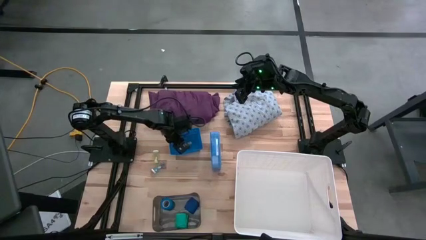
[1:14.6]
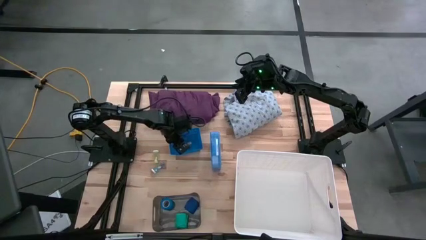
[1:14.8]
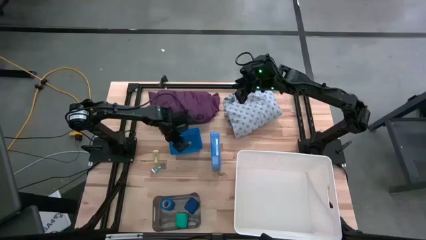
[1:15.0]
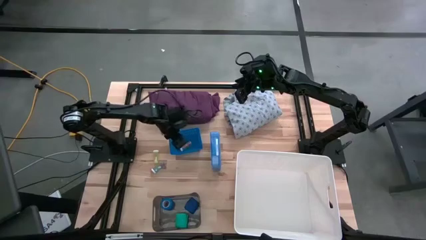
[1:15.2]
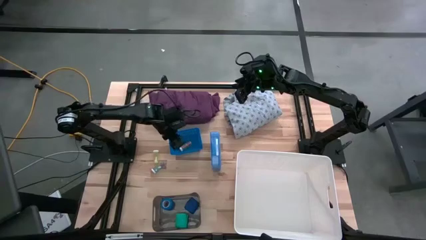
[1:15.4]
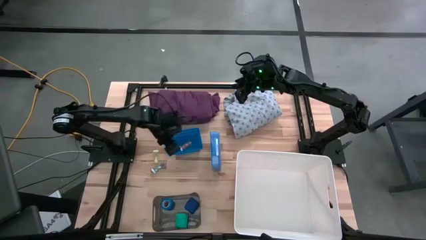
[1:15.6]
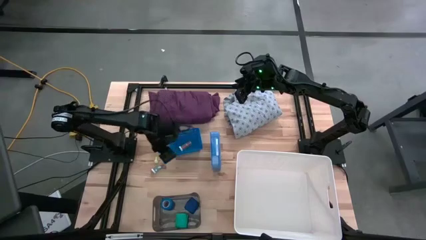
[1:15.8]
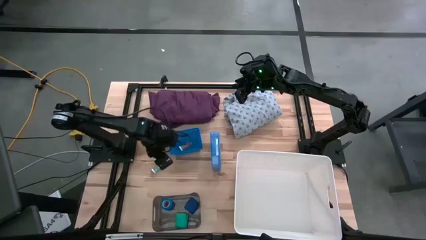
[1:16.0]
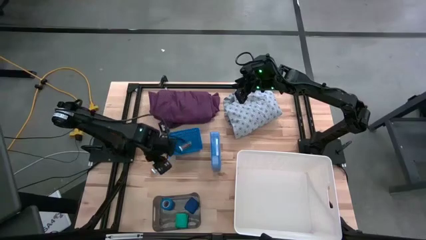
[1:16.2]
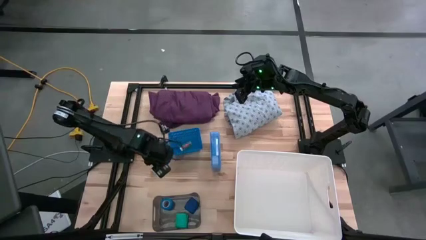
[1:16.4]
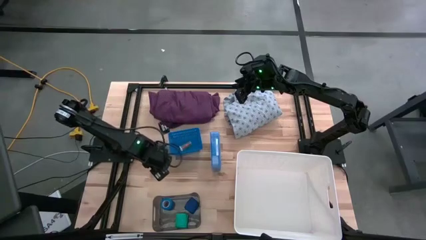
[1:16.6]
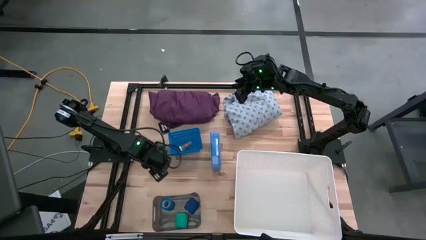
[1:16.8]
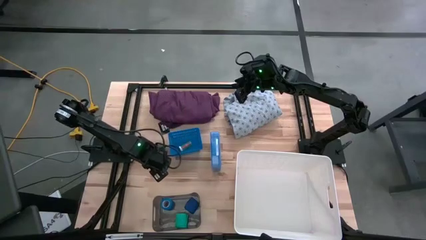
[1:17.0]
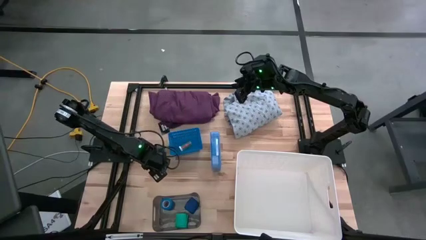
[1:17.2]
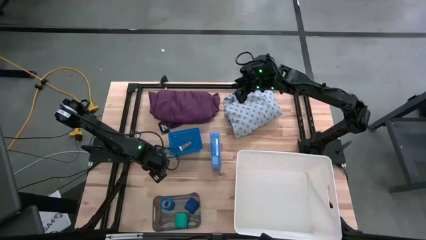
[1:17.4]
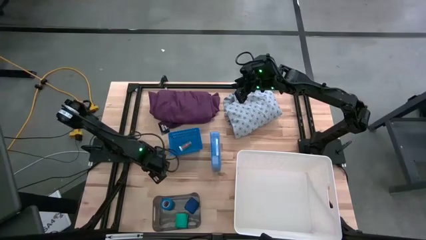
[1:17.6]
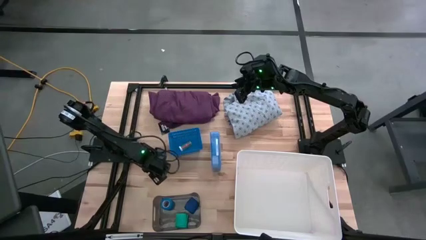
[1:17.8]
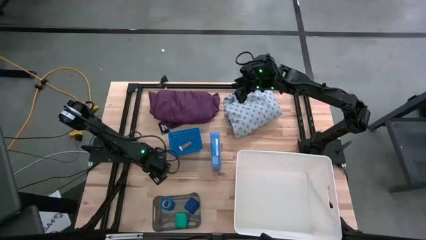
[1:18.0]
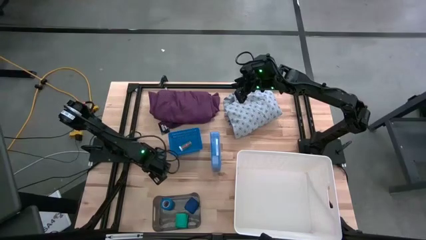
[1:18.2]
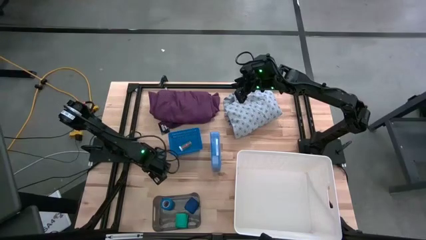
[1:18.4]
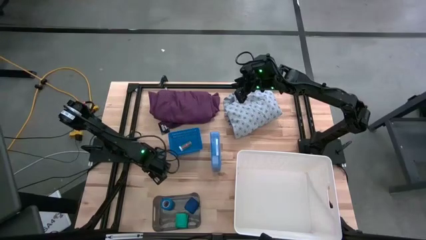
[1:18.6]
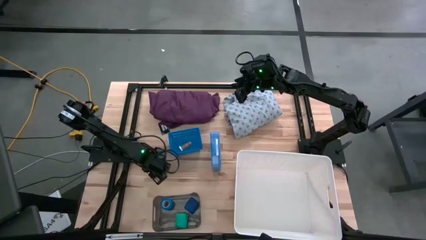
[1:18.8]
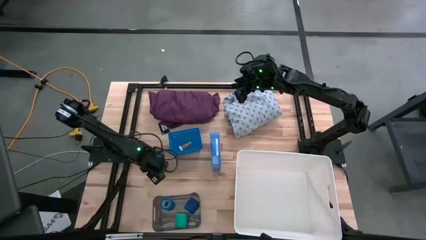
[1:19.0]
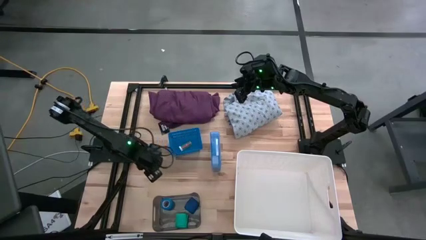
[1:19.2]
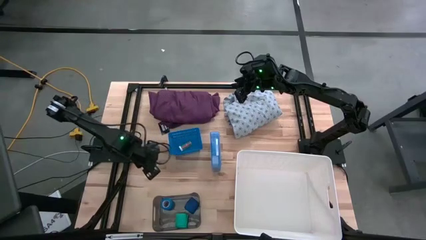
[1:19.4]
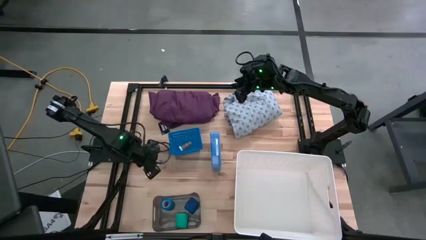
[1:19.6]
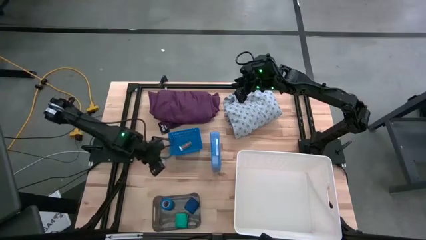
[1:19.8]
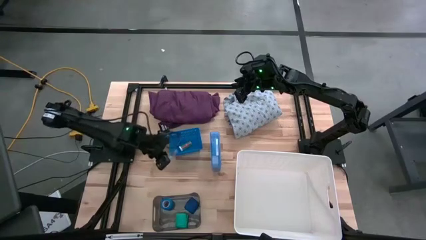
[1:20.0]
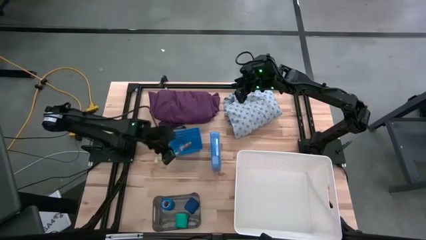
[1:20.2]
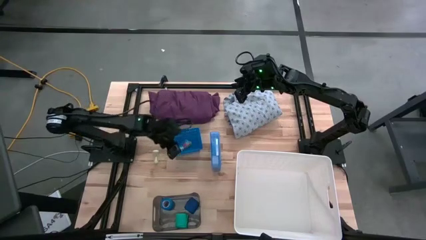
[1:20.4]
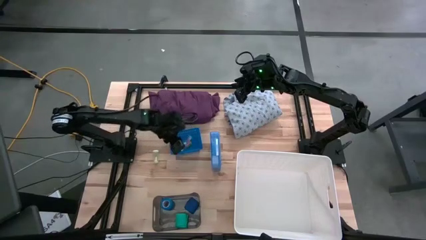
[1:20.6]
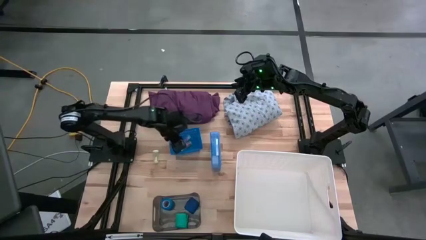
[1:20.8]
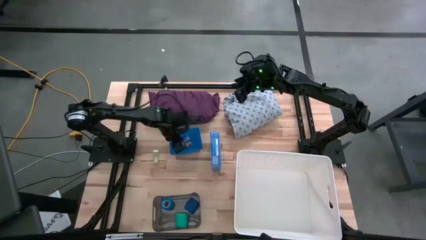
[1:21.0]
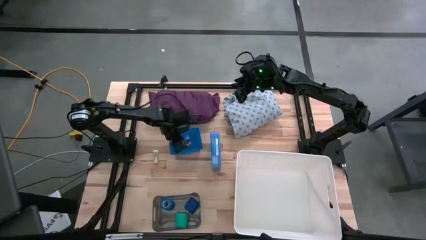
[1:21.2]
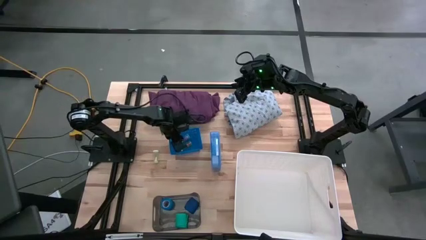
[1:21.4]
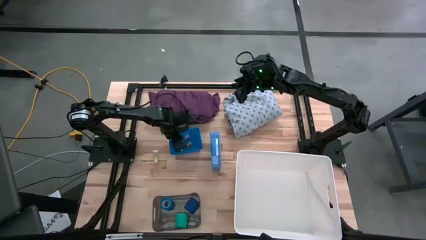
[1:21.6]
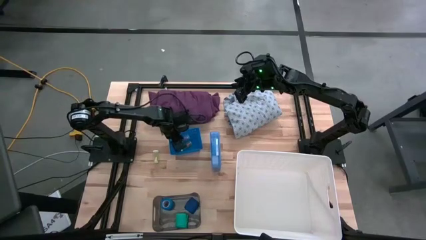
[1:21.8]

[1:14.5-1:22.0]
Task: Pick & Place Medicine items
Put the blue pill bottle into the blue bin

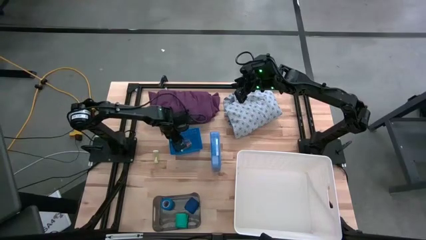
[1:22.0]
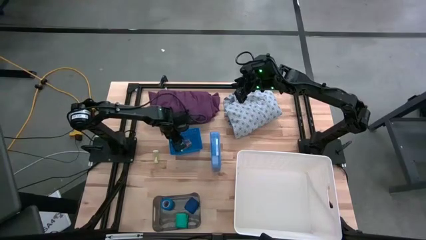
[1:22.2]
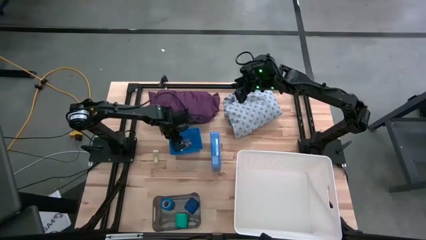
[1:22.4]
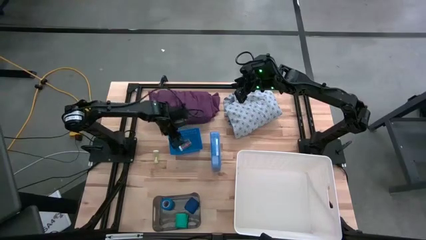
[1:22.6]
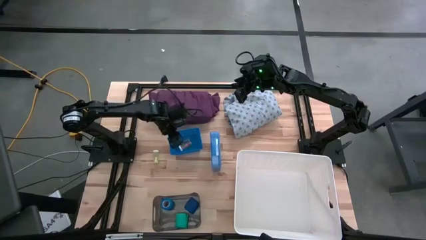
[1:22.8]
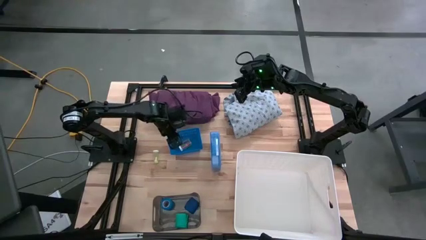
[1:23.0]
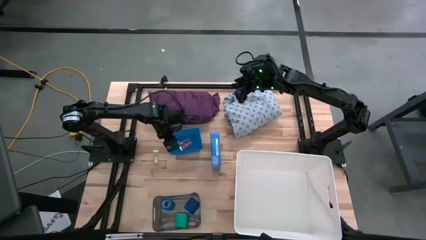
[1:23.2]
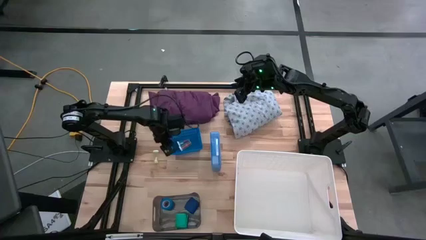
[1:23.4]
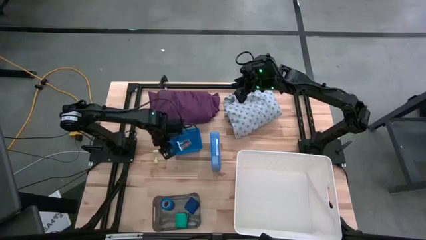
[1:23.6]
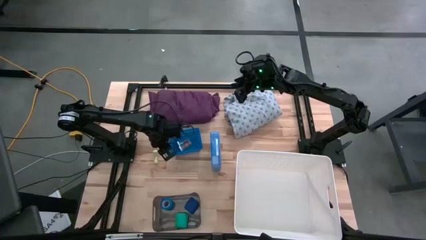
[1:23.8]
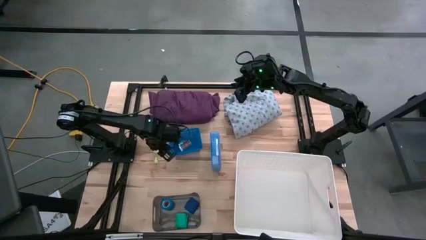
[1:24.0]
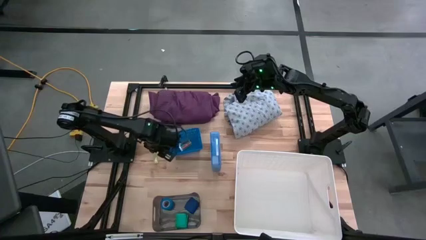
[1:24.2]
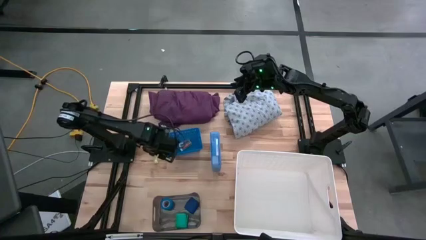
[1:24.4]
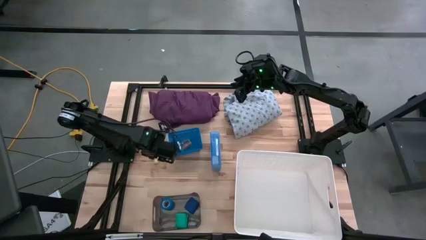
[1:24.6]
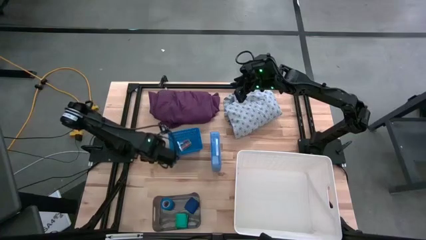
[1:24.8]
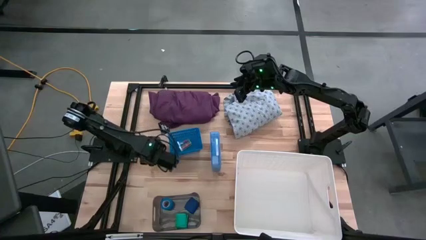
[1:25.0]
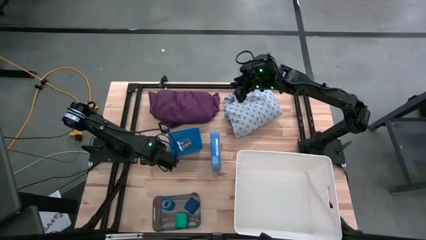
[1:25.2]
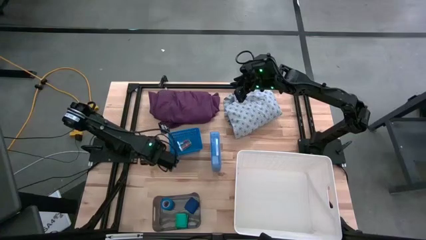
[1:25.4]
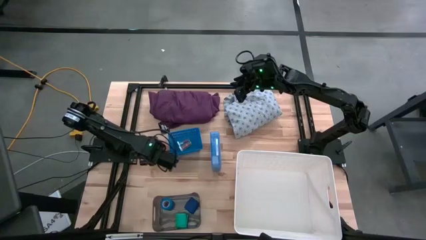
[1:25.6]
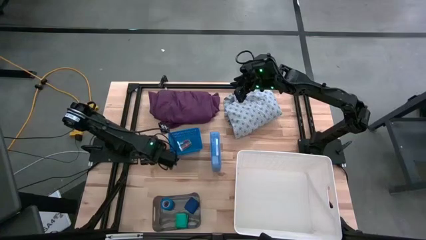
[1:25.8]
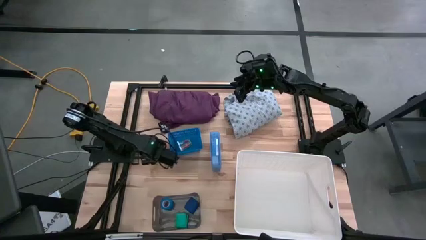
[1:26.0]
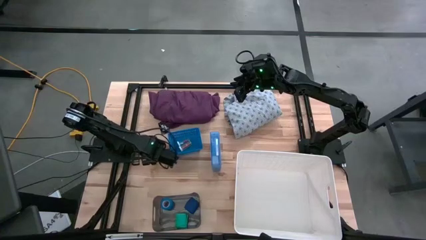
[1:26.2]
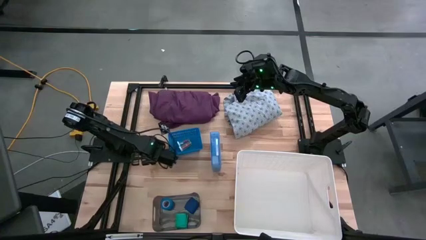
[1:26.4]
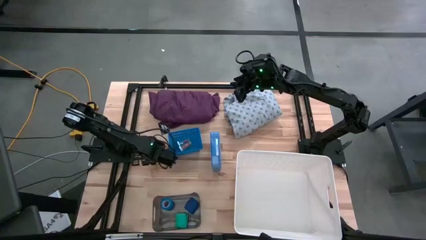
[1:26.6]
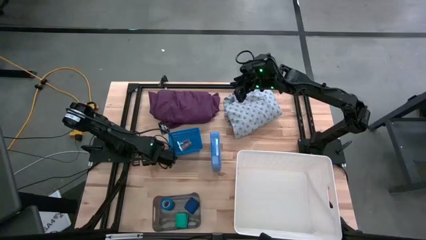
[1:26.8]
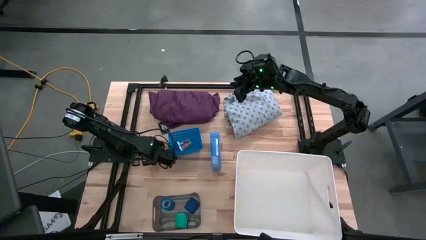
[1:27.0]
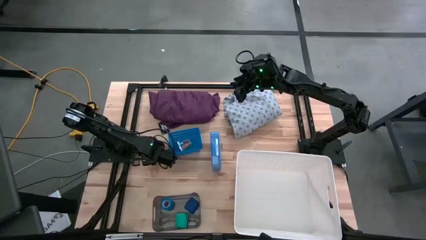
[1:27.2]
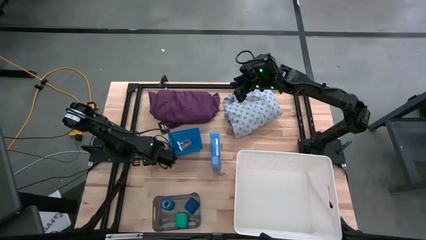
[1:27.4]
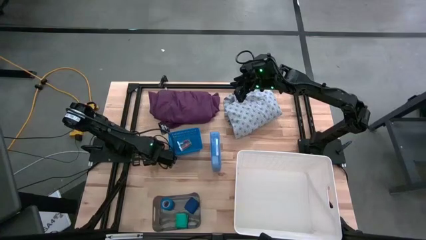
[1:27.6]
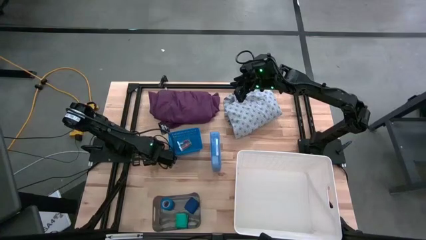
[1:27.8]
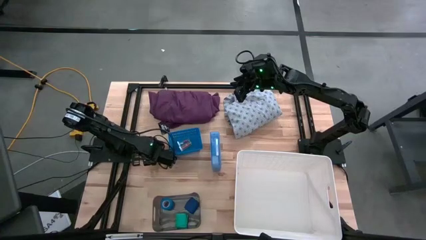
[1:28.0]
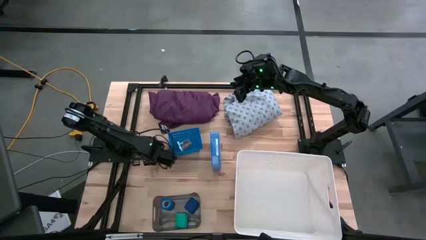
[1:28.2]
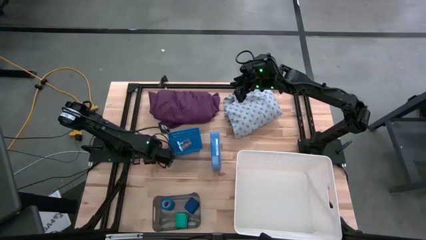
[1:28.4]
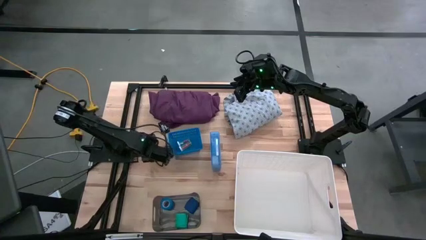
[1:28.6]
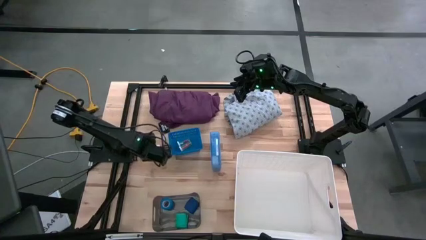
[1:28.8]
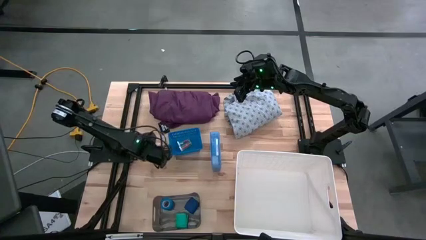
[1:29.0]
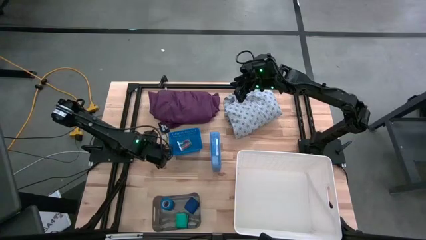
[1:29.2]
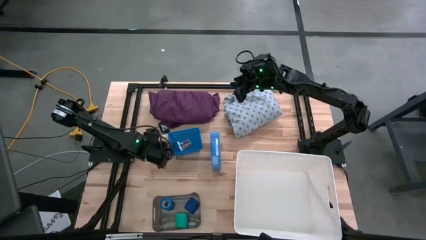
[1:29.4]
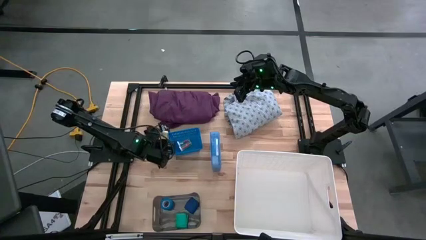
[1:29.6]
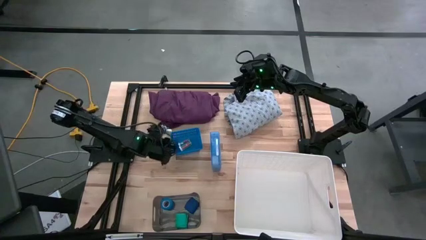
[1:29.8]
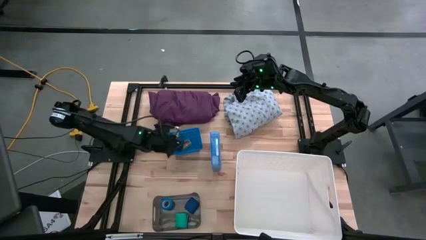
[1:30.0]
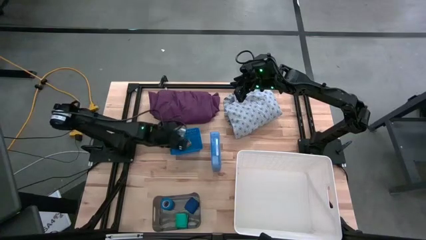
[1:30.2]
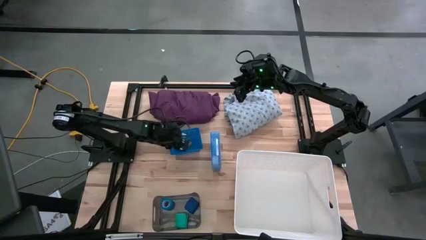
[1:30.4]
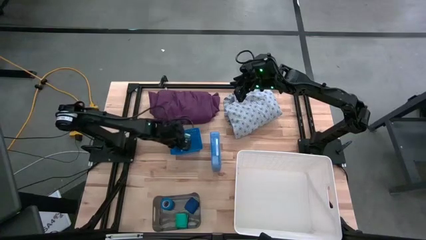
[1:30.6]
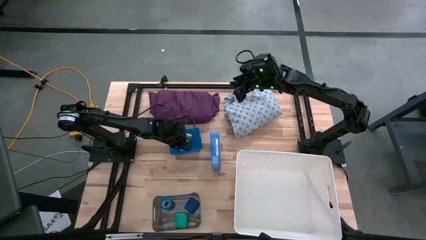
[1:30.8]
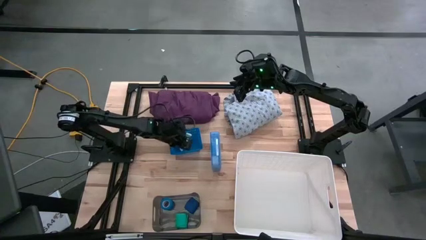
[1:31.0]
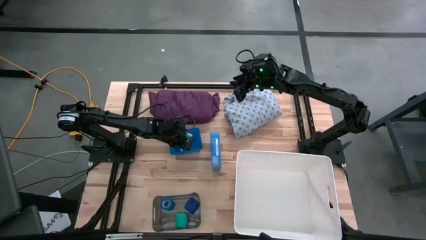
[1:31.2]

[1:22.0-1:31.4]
Put the yellow pill bottle into the blue bin
